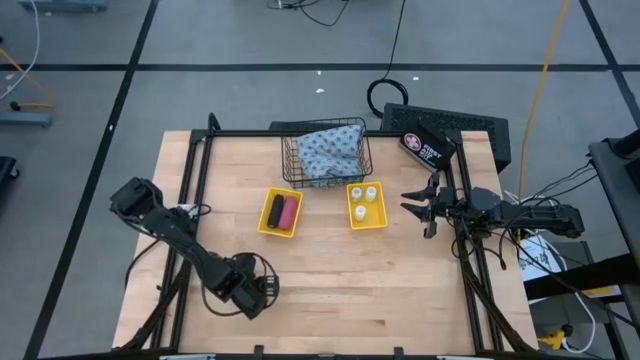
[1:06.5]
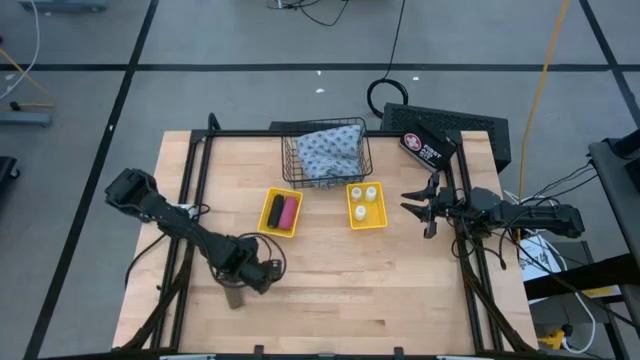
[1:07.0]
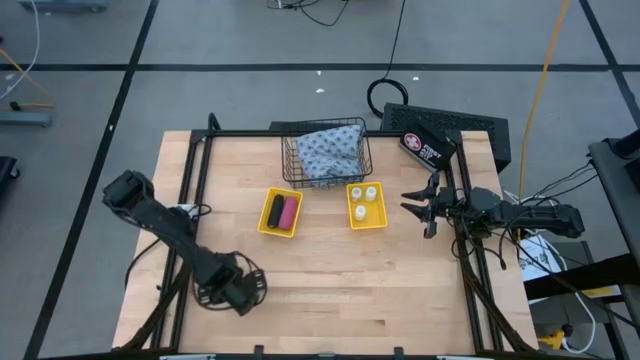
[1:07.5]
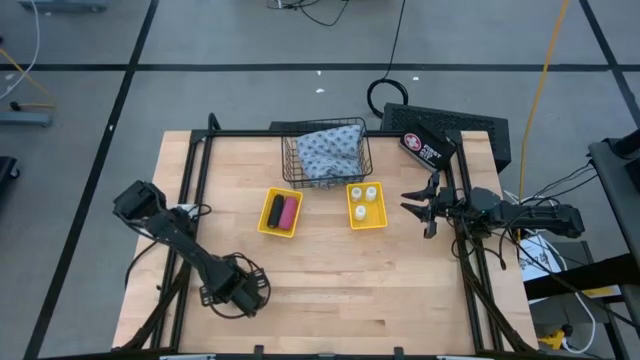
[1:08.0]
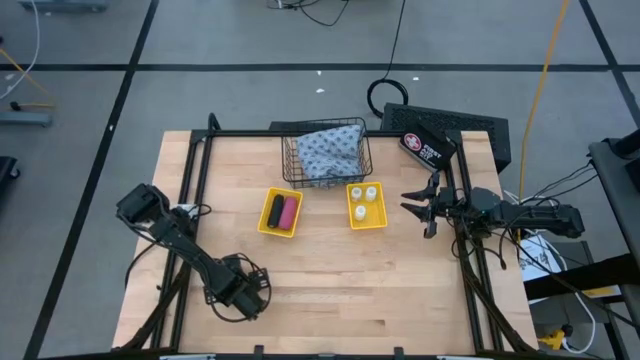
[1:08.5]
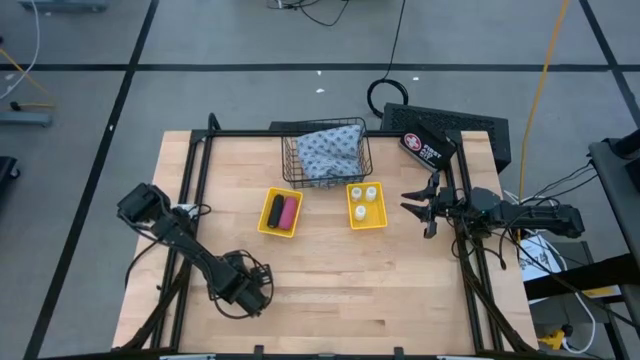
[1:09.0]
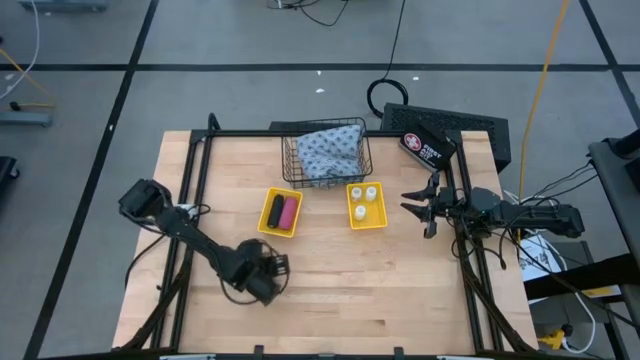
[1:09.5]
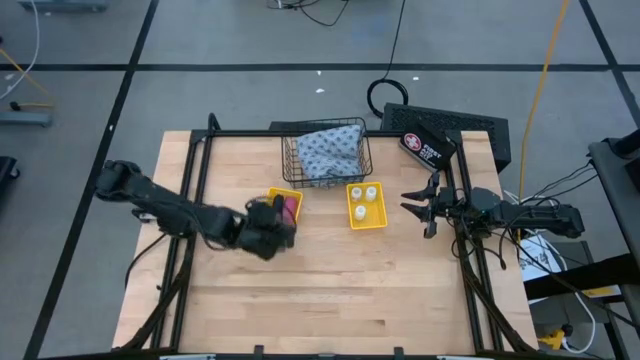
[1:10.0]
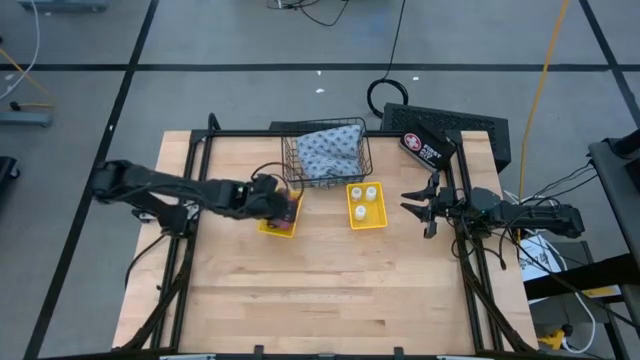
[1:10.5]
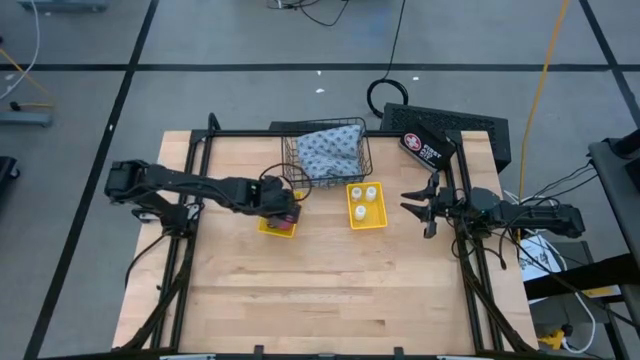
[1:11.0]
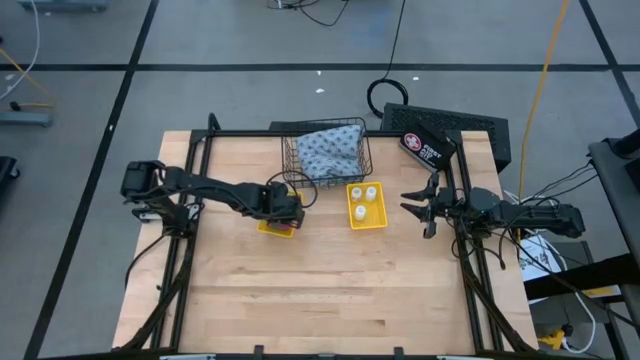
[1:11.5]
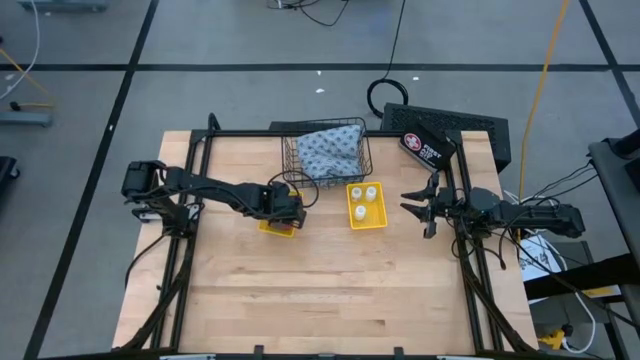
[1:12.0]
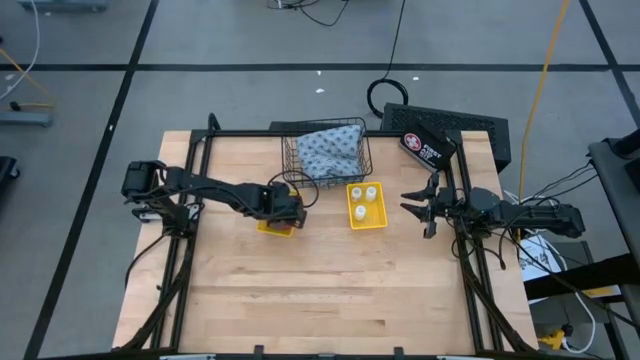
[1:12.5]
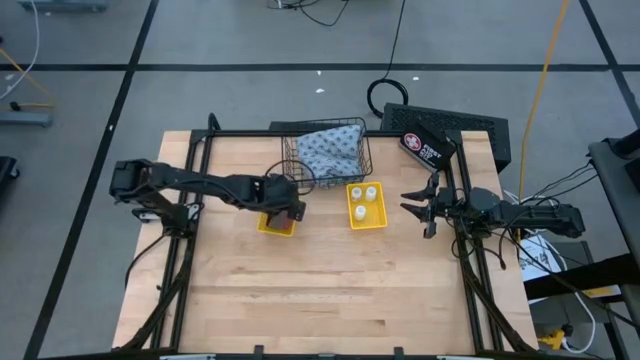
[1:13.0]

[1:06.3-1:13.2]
Task: Pick & Place Medicine items
Put the brown bandage into the left yellow basket

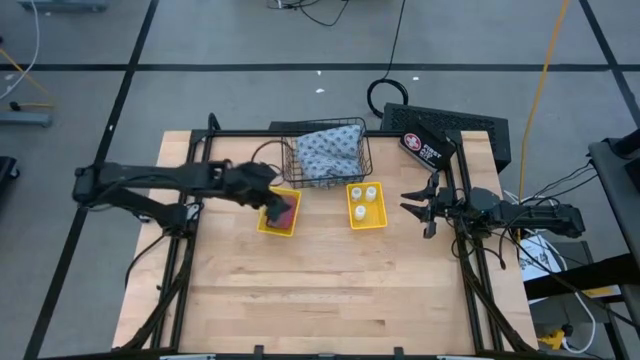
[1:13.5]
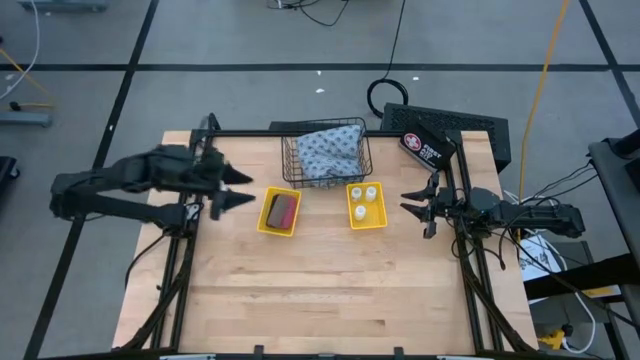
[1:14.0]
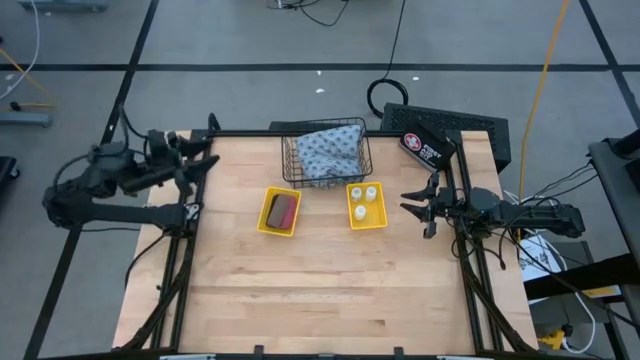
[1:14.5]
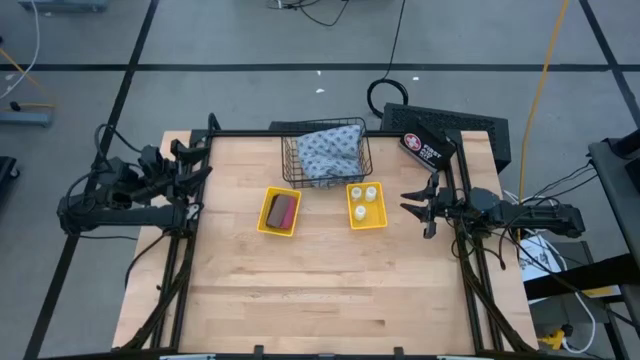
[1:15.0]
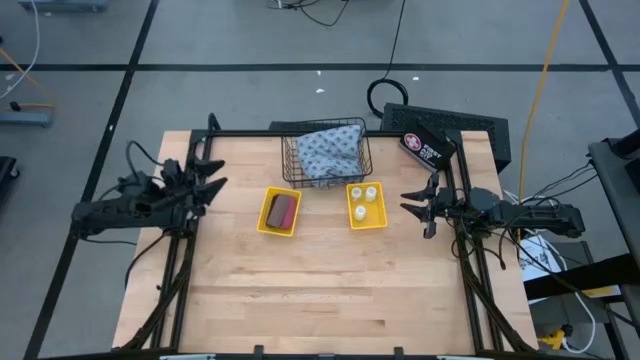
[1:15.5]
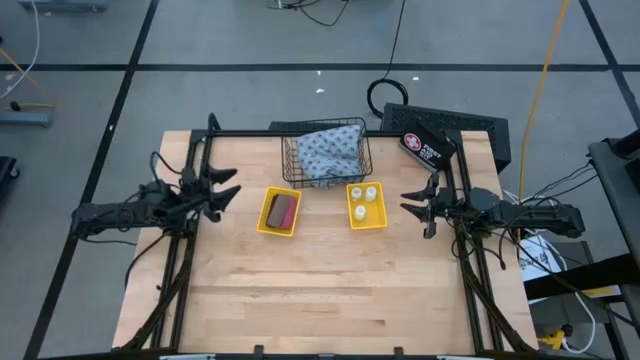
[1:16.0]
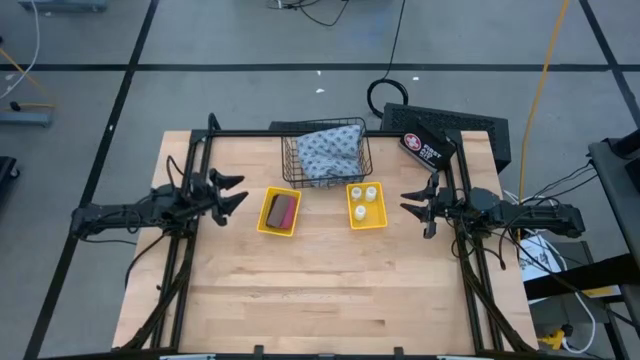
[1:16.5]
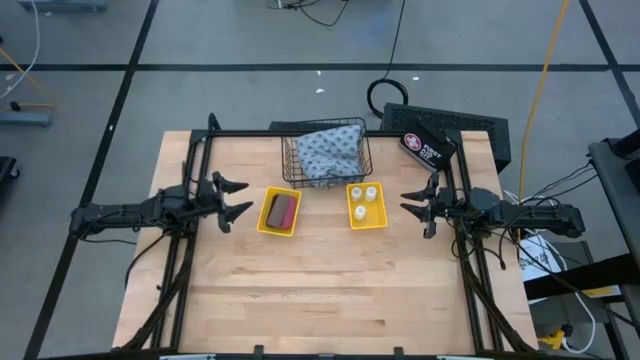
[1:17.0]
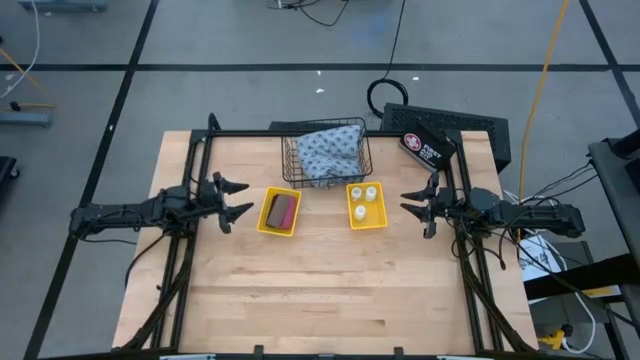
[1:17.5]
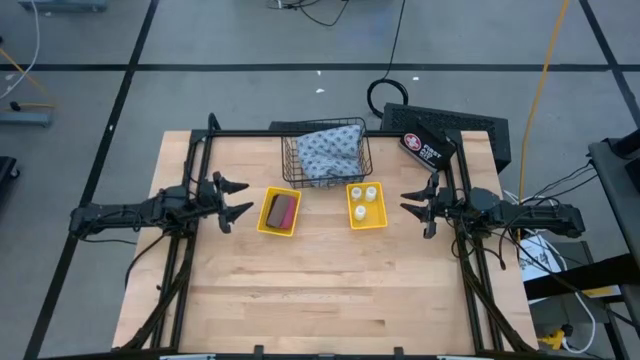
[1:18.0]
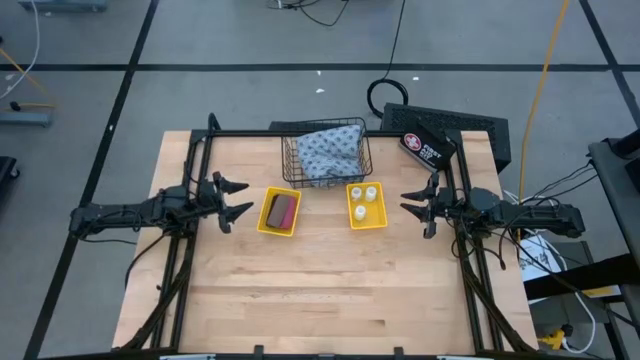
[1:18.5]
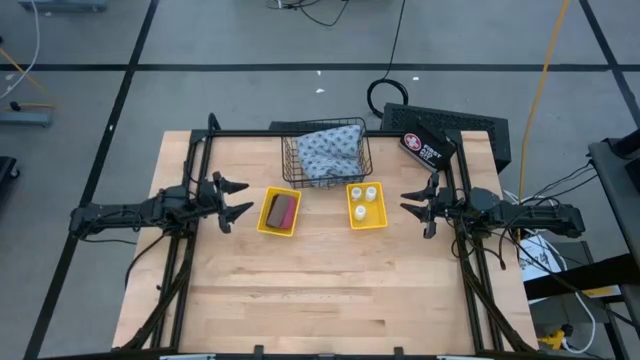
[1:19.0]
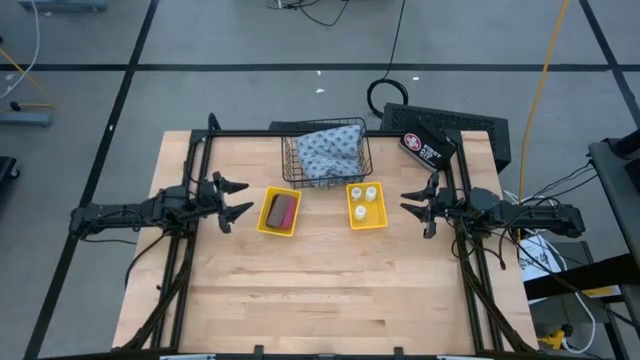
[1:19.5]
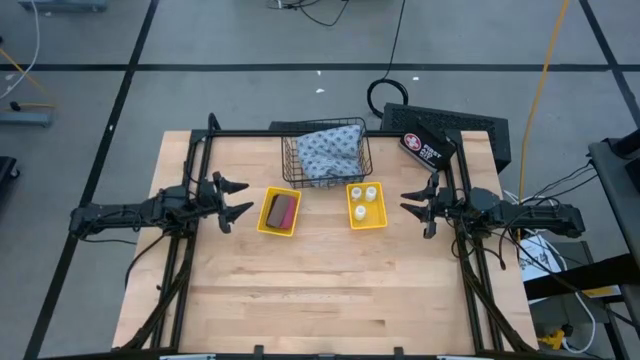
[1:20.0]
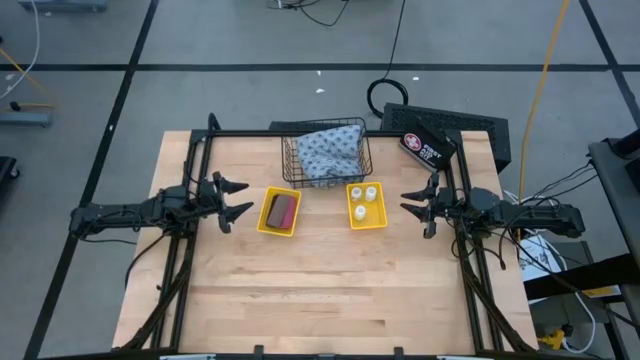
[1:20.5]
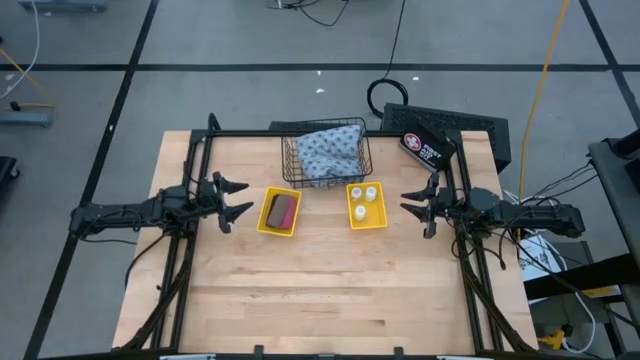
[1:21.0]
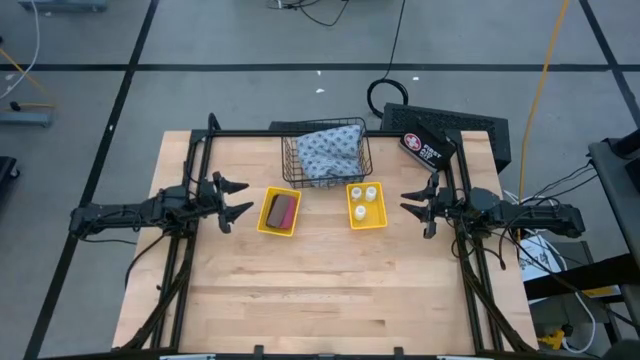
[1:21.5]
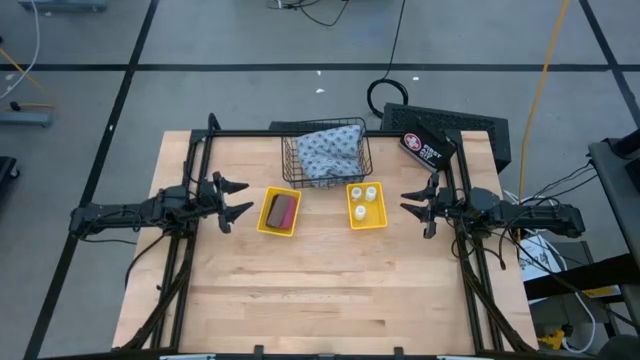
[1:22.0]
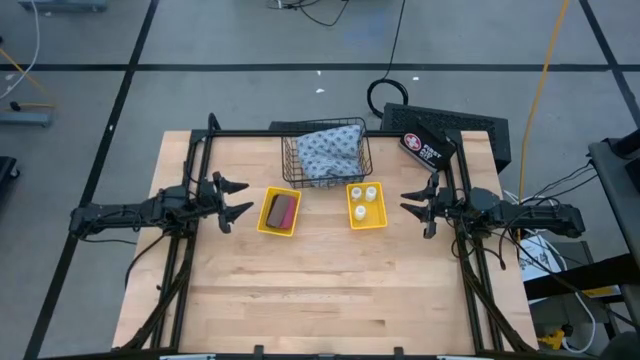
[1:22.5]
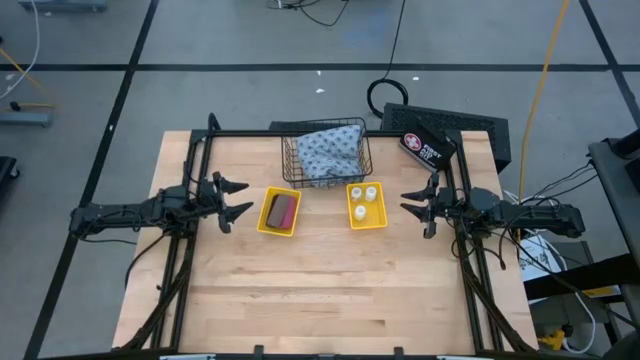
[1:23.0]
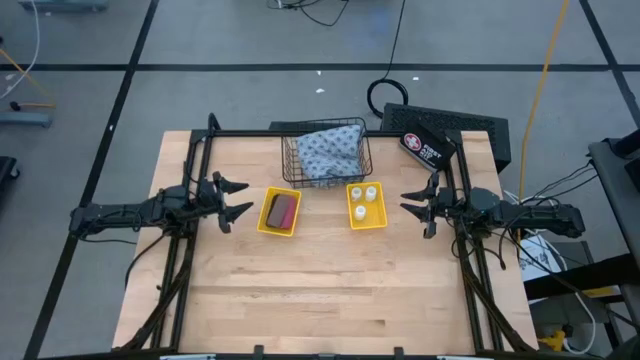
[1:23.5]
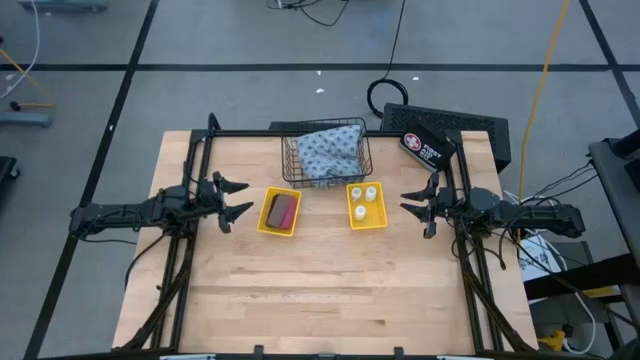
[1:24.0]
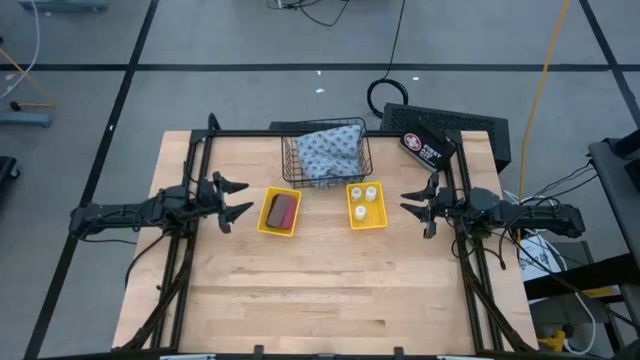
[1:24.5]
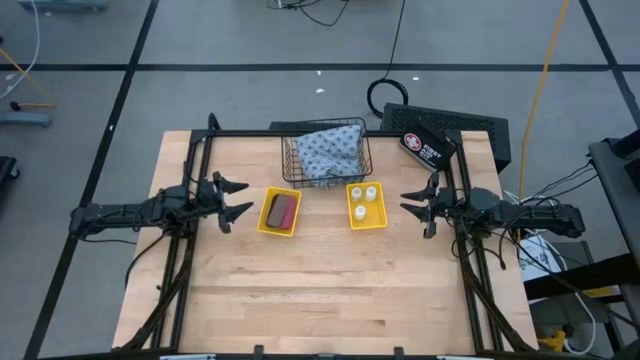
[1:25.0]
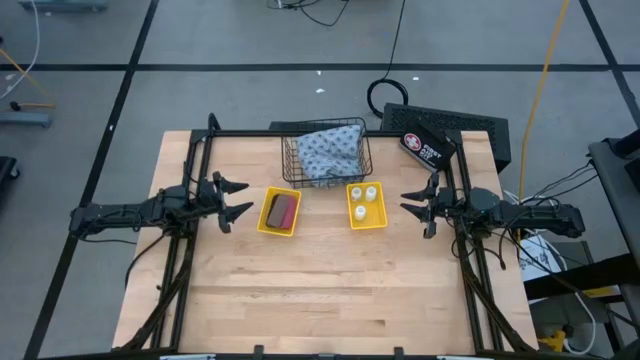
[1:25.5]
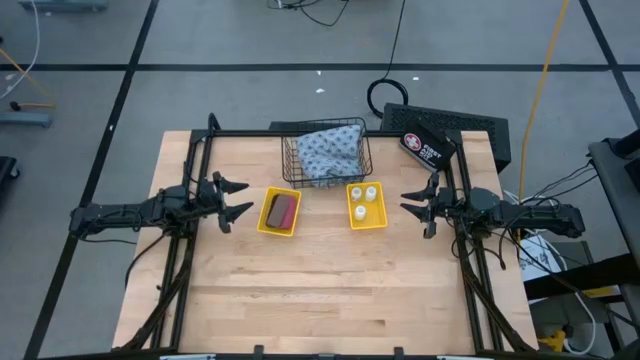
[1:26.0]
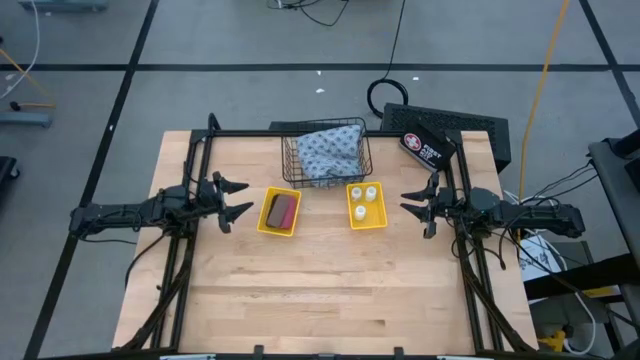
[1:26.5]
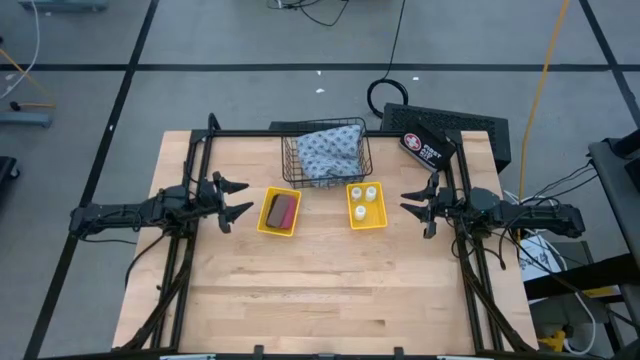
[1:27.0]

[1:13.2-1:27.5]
Return to Home Position
